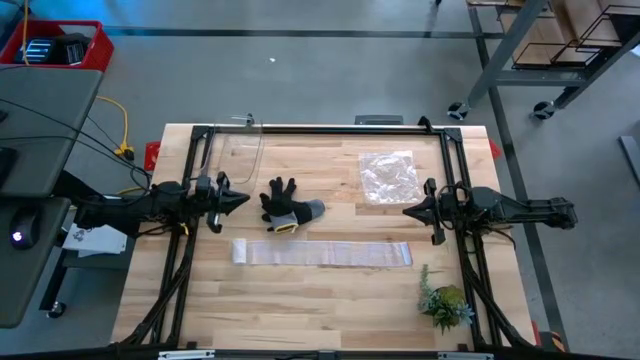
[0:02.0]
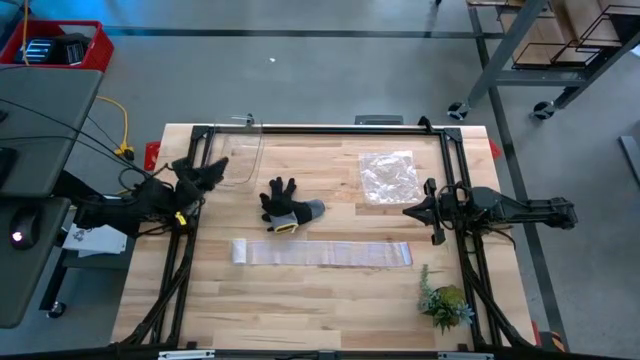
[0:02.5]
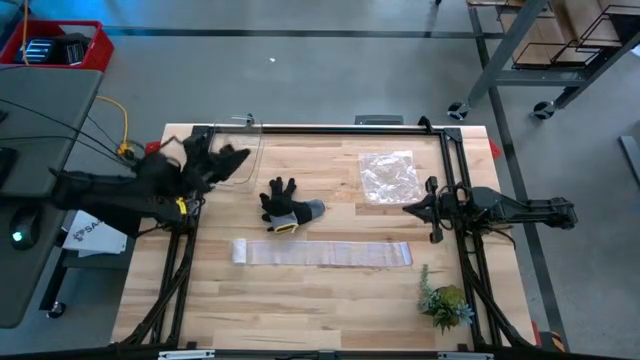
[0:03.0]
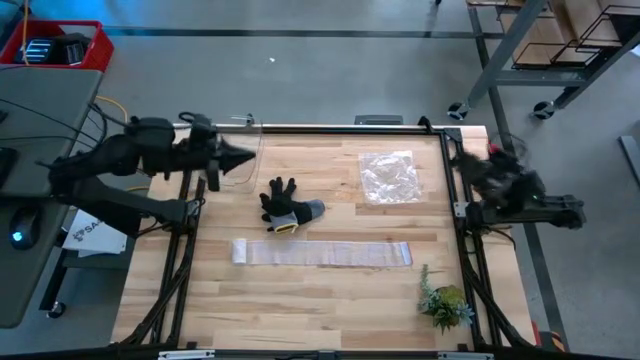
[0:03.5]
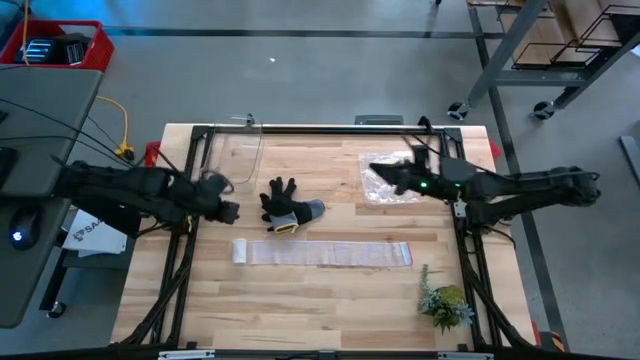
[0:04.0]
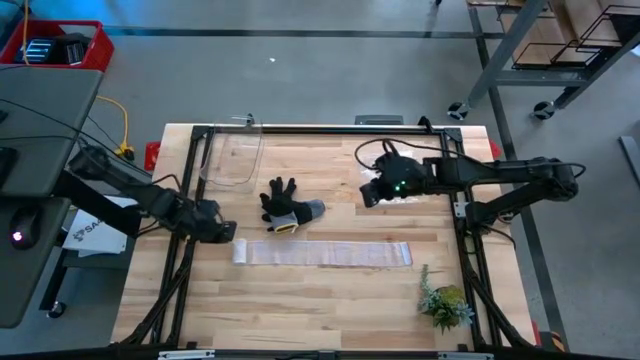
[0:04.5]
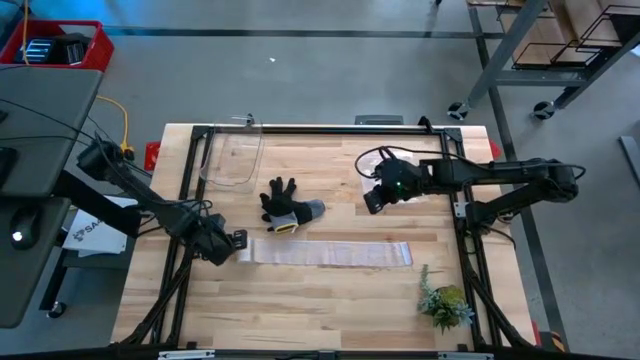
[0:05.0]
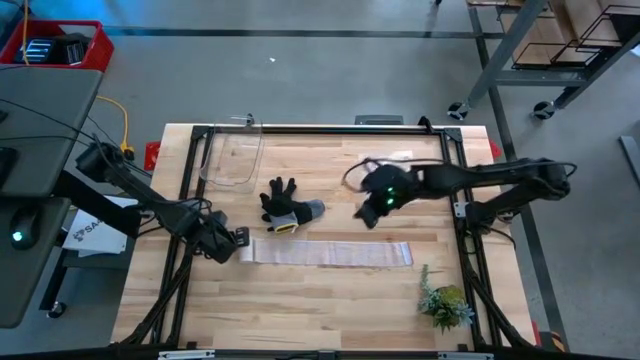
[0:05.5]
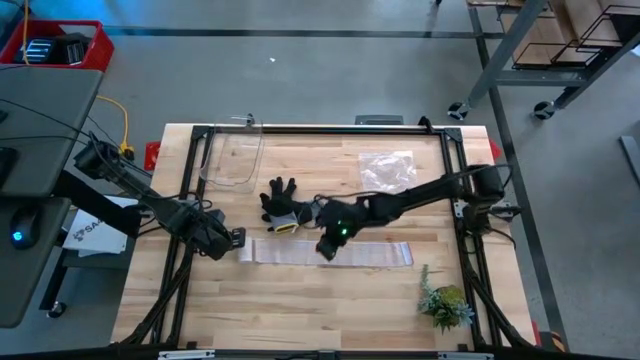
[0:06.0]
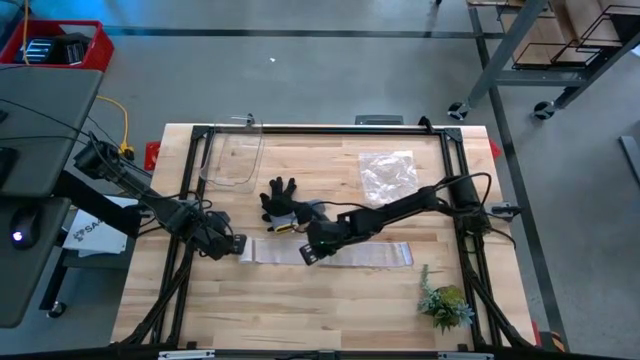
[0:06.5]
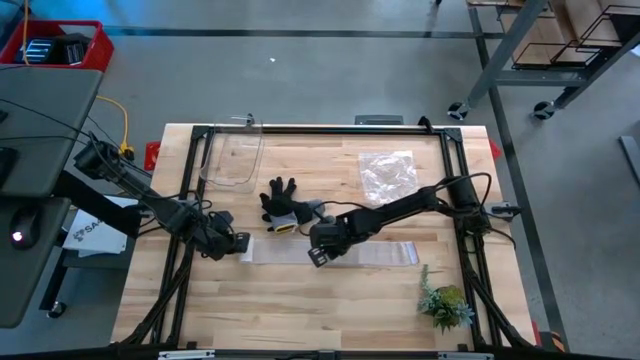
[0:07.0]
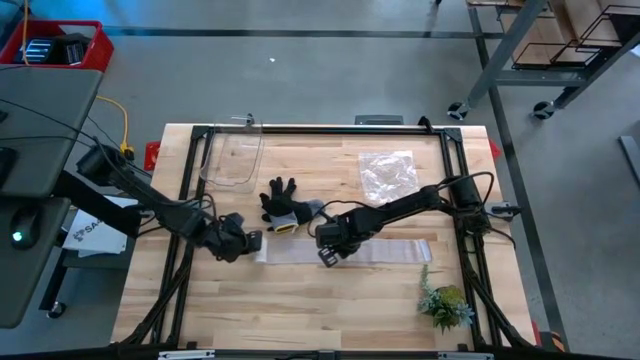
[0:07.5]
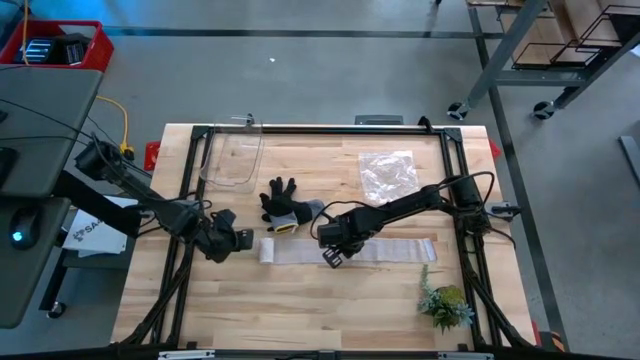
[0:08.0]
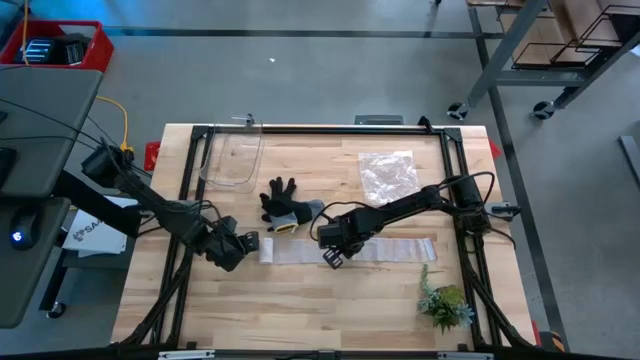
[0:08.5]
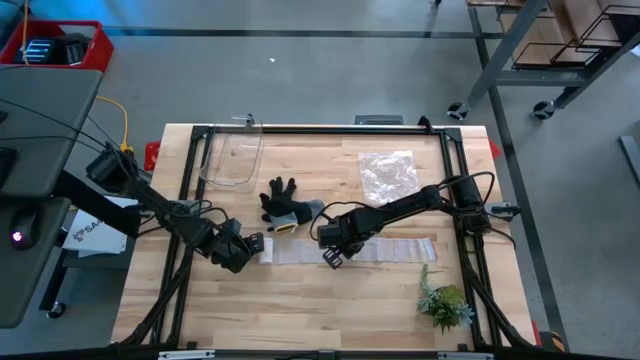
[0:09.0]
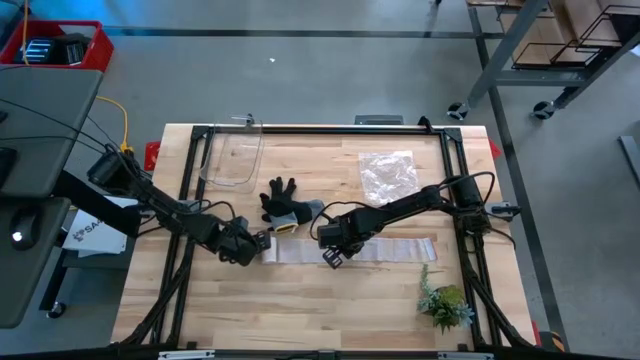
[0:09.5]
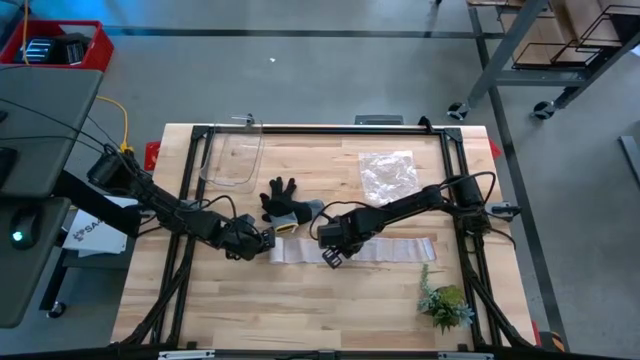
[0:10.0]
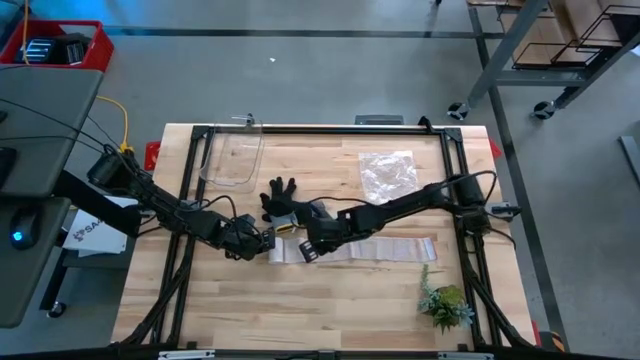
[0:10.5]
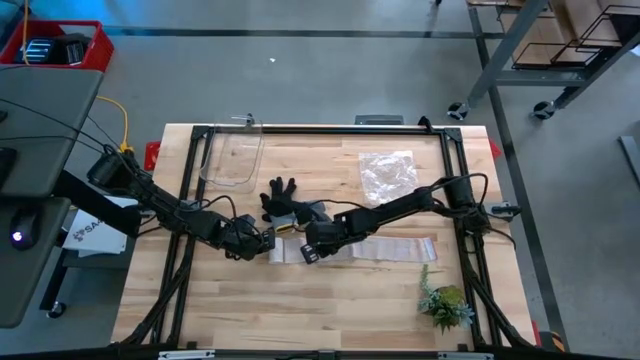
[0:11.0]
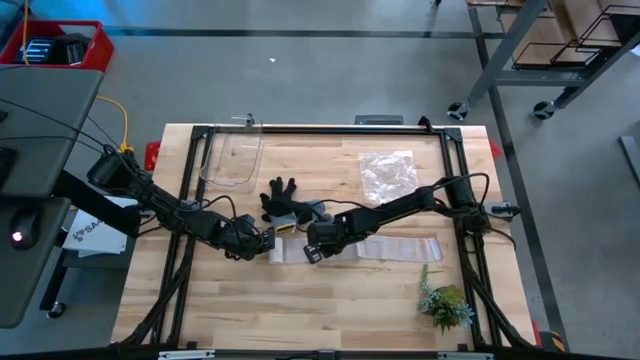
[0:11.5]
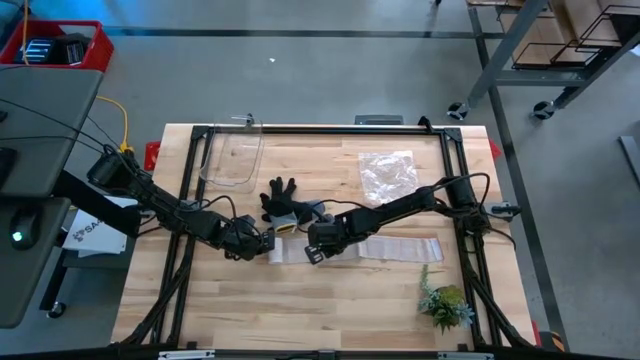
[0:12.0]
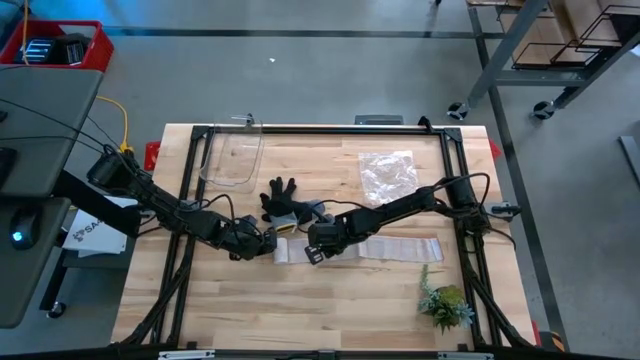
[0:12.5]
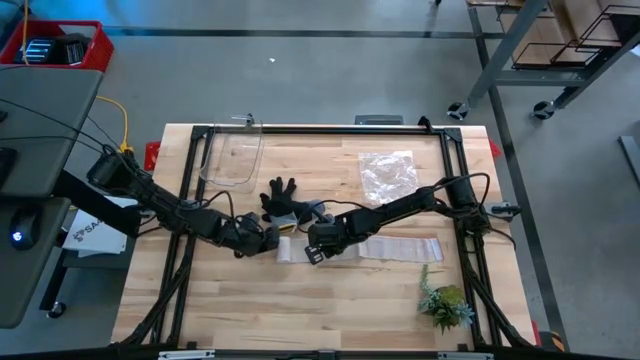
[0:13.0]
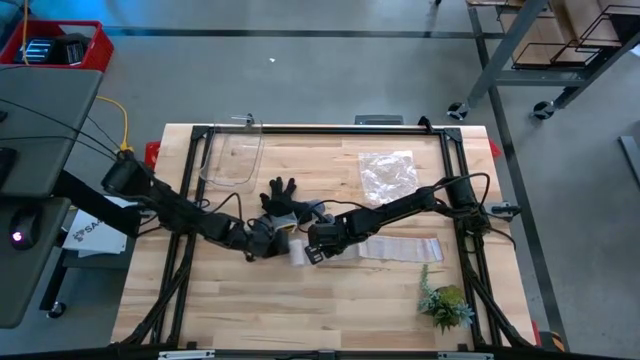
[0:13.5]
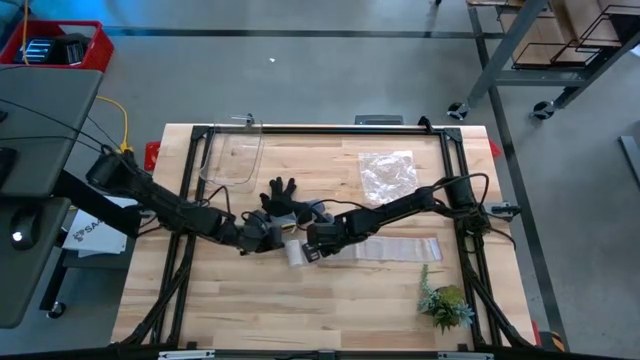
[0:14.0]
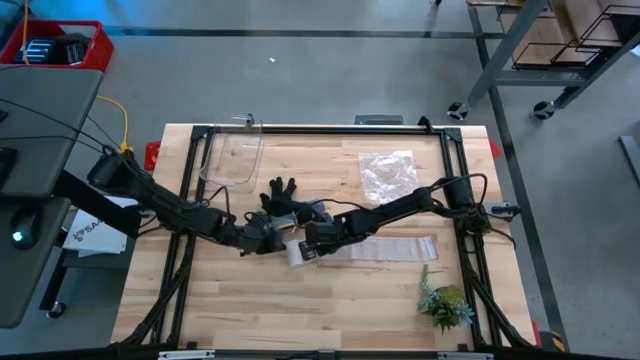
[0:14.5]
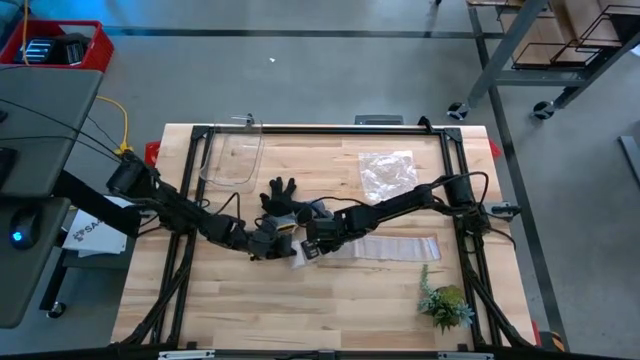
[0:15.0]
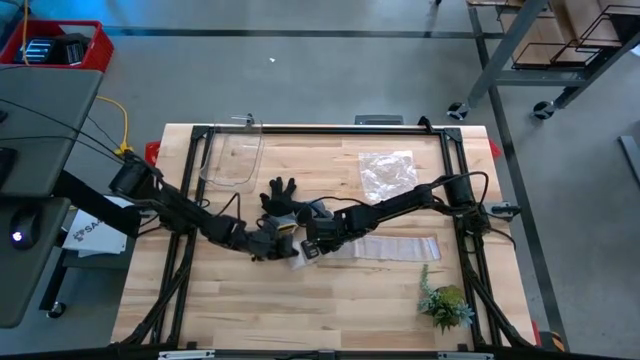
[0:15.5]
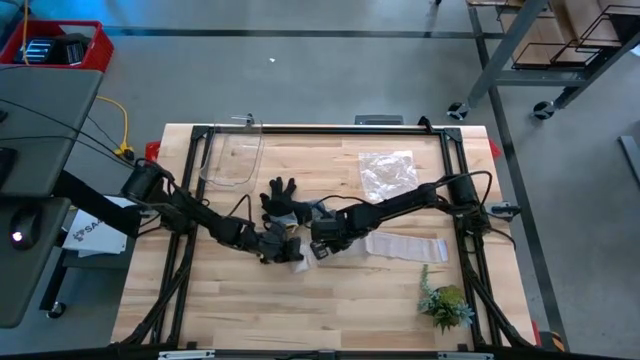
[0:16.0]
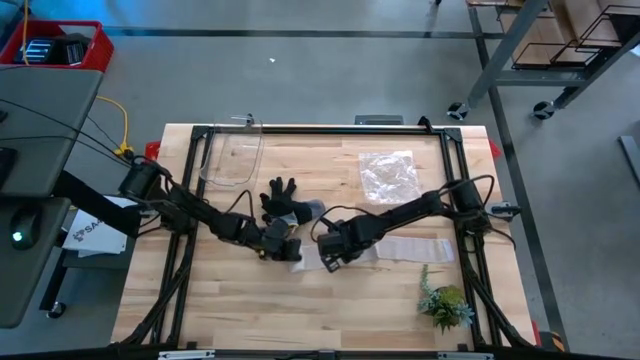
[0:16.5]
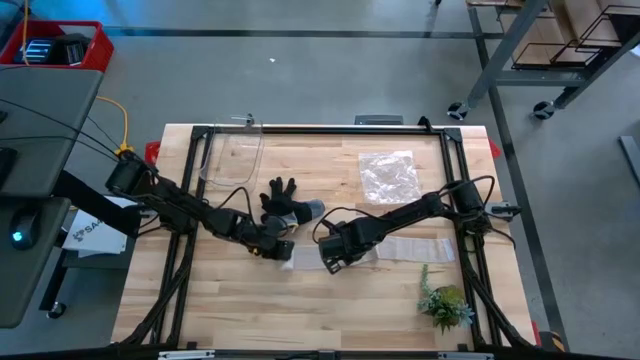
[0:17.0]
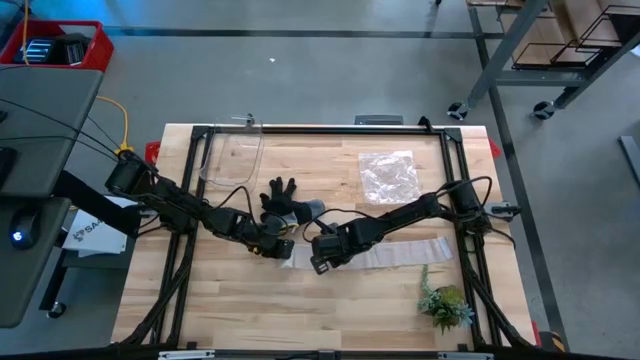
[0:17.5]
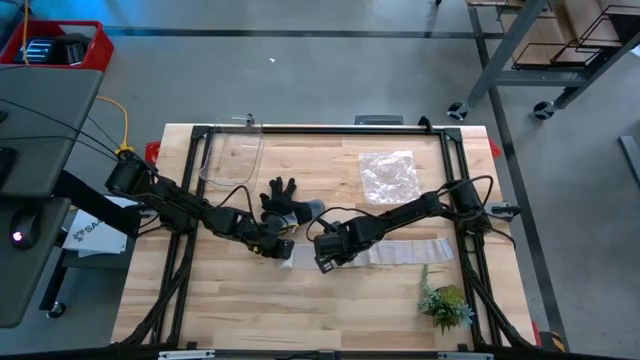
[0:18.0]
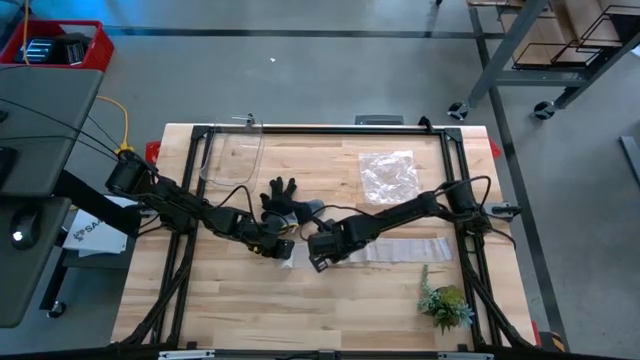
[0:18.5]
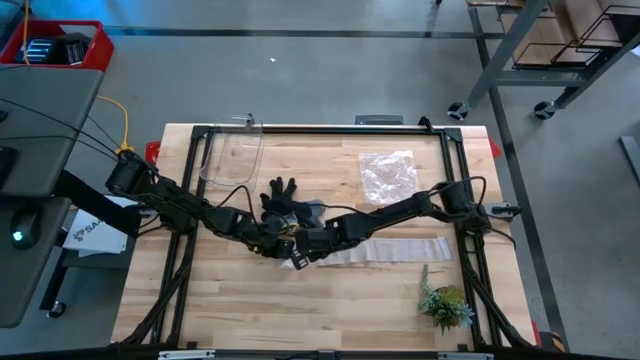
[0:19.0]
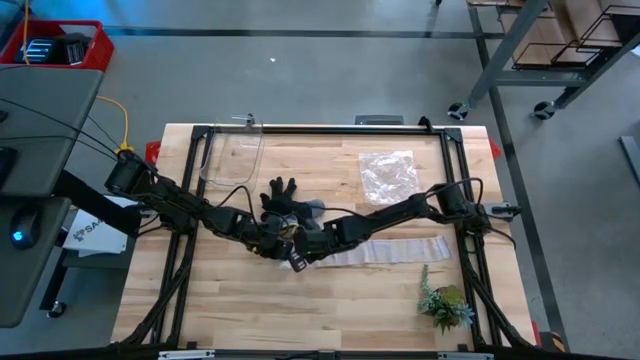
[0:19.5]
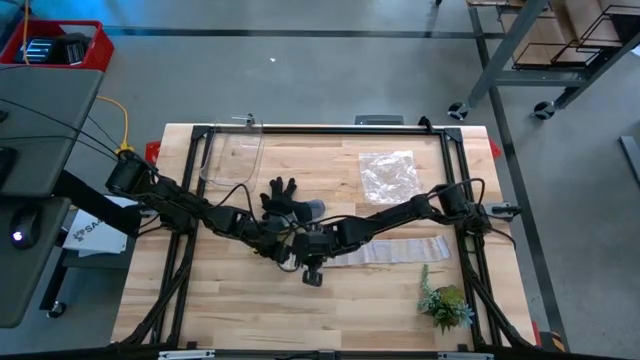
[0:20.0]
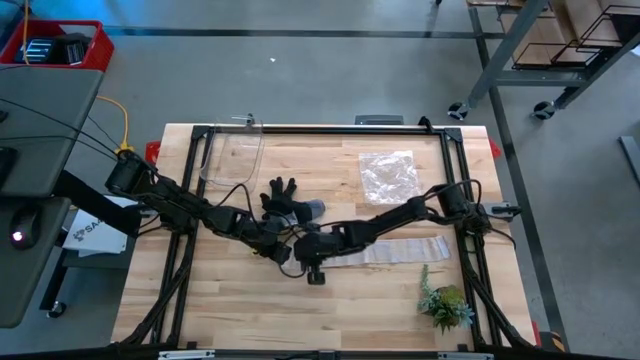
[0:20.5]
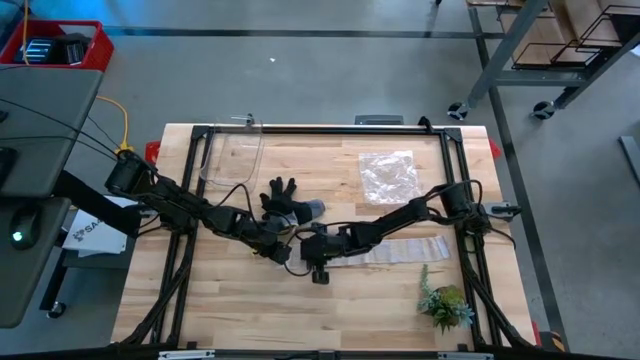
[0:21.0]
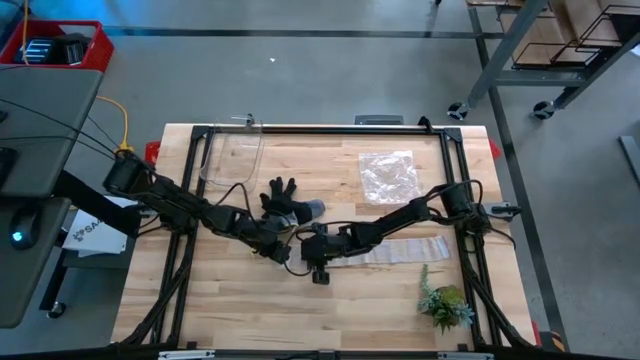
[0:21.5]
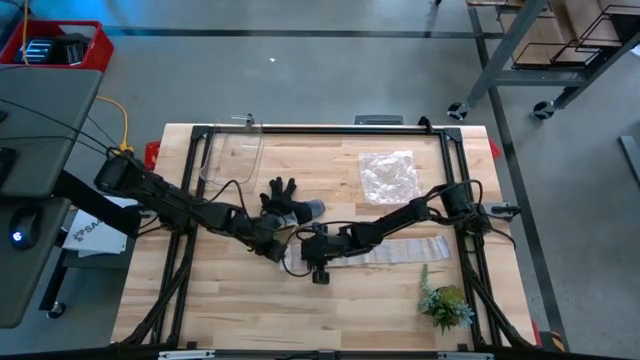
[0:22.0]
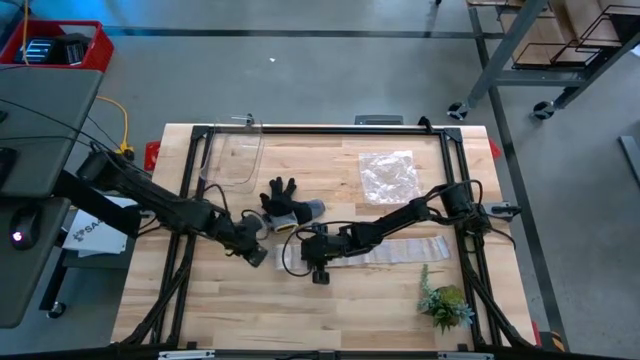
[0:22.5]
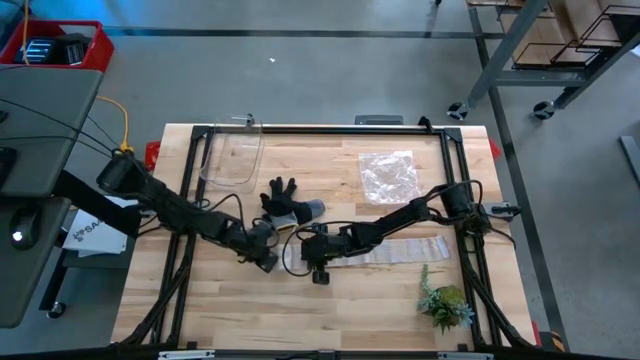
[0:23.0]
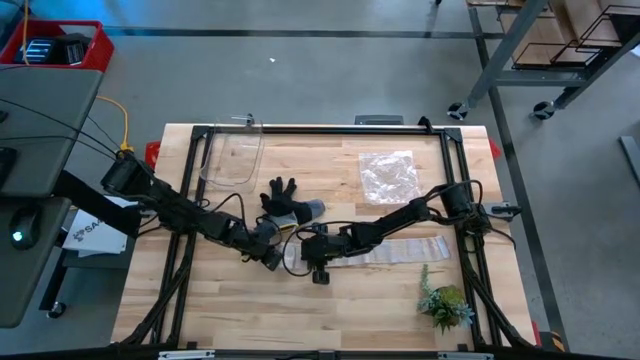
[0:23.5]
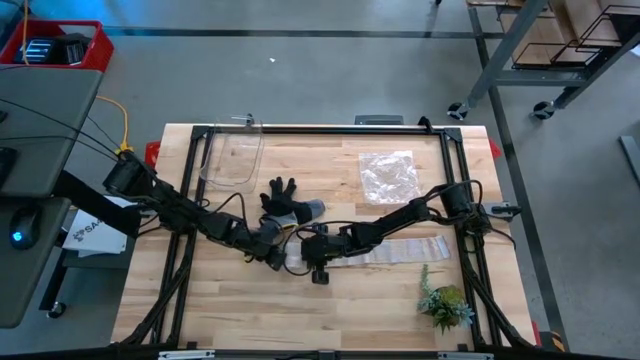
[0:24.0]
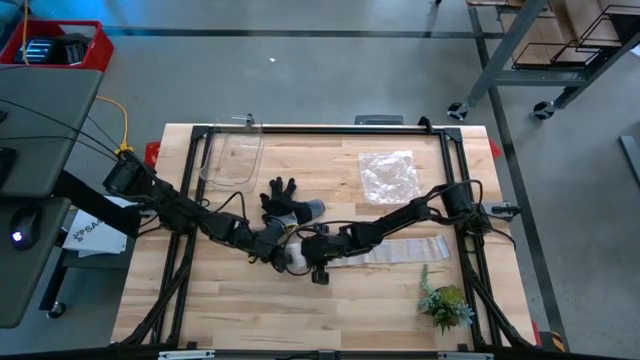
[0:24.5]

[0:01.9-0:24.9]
Task: Roll bandage
Roll the white-brown bandage
